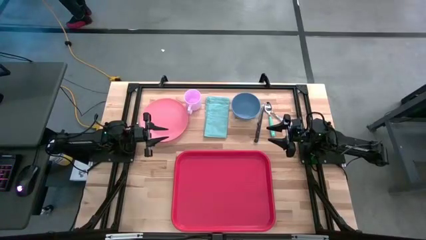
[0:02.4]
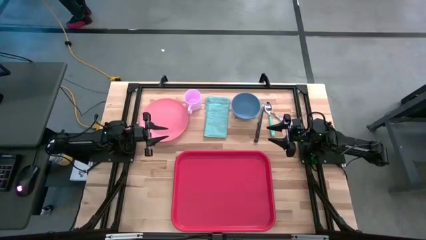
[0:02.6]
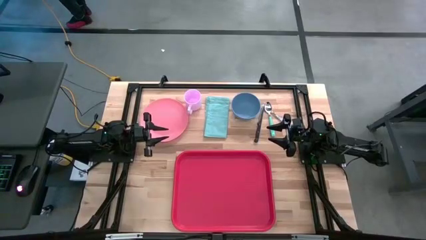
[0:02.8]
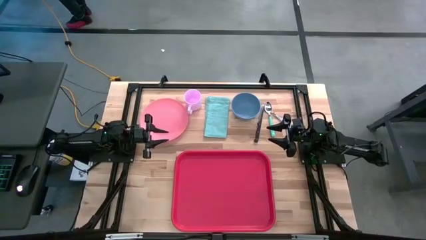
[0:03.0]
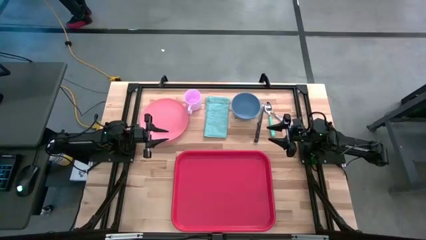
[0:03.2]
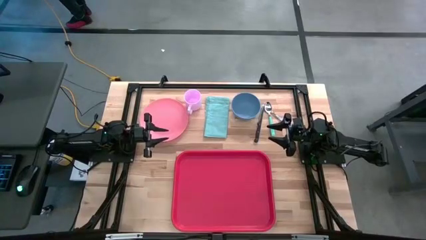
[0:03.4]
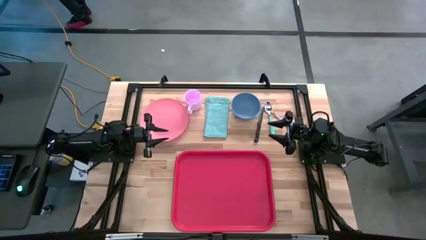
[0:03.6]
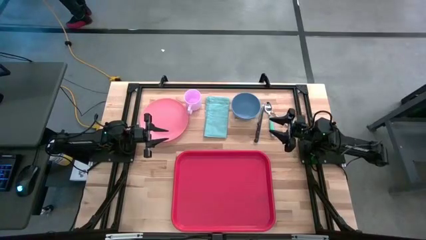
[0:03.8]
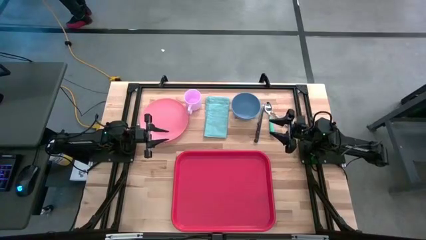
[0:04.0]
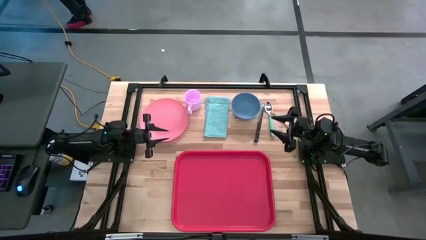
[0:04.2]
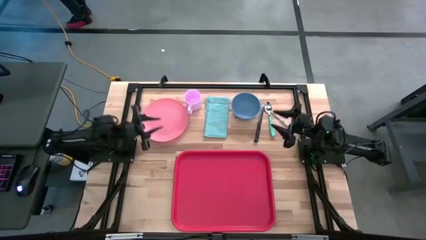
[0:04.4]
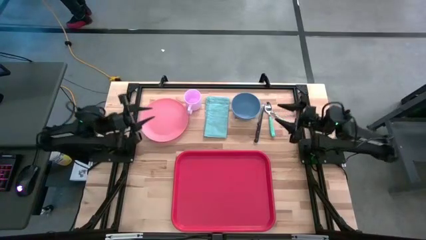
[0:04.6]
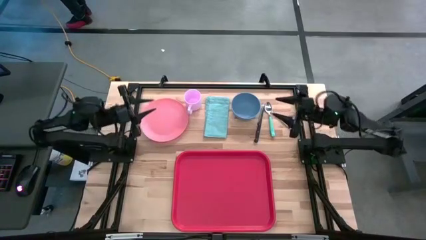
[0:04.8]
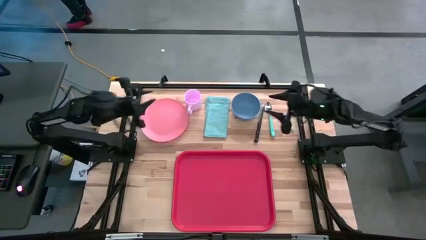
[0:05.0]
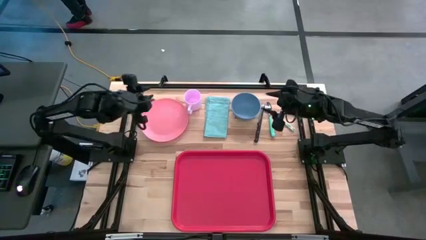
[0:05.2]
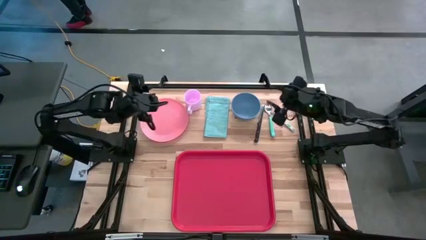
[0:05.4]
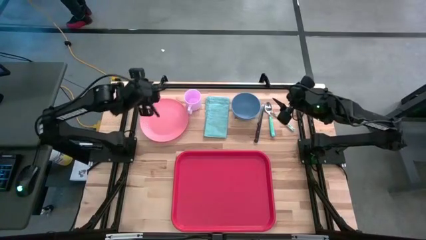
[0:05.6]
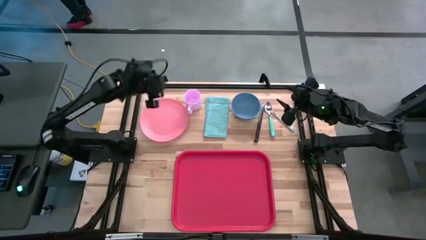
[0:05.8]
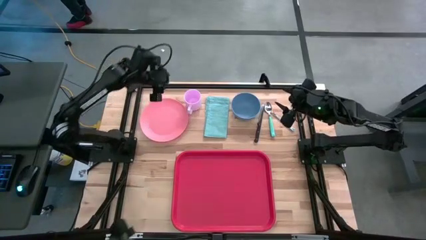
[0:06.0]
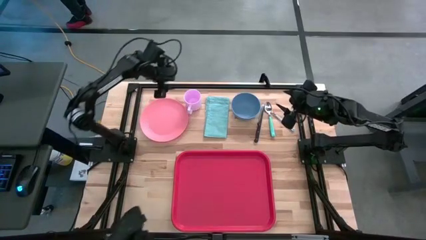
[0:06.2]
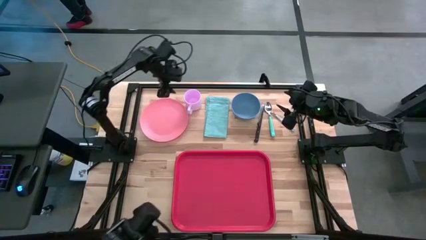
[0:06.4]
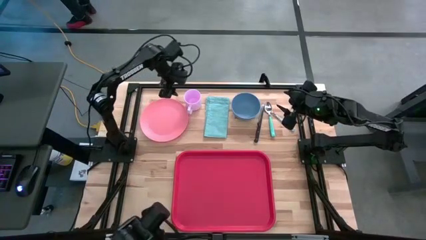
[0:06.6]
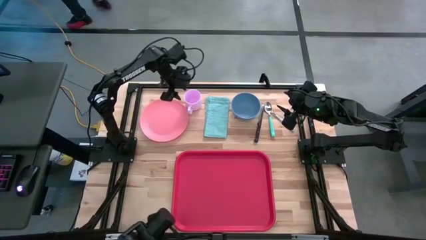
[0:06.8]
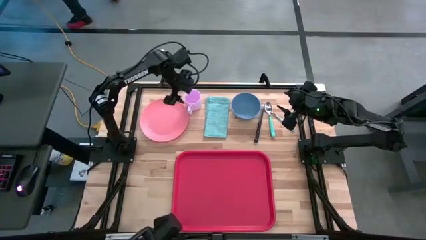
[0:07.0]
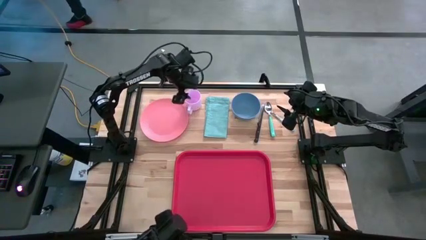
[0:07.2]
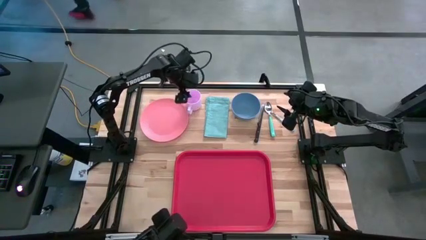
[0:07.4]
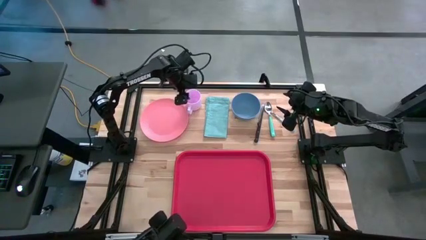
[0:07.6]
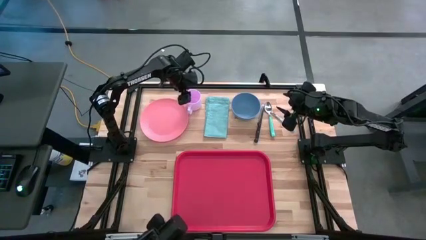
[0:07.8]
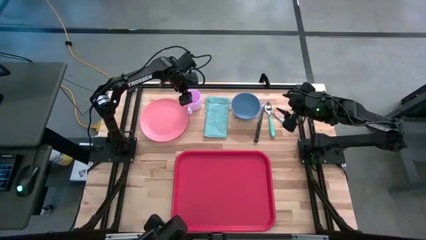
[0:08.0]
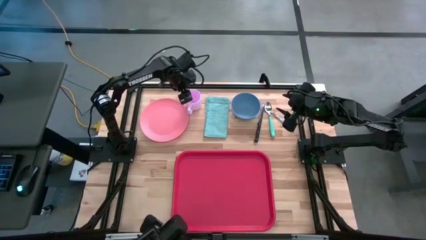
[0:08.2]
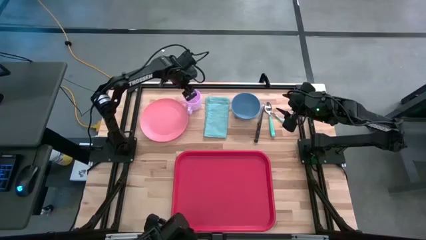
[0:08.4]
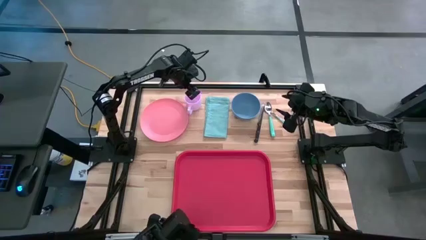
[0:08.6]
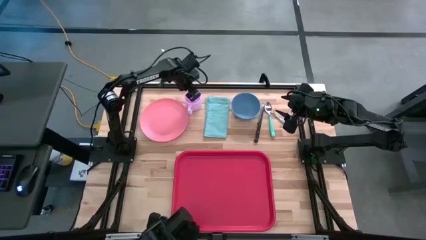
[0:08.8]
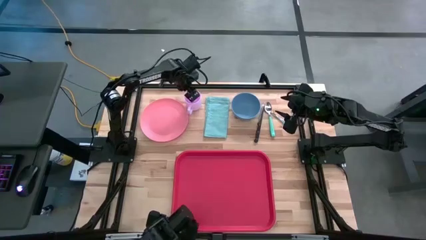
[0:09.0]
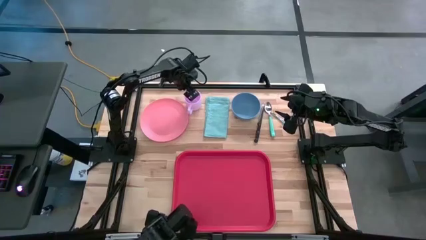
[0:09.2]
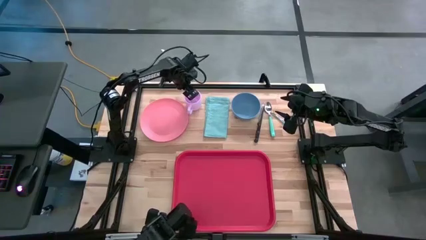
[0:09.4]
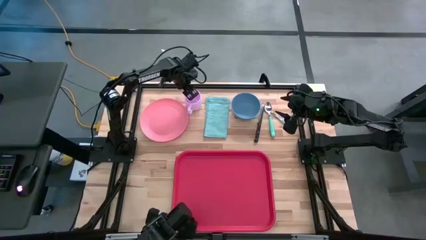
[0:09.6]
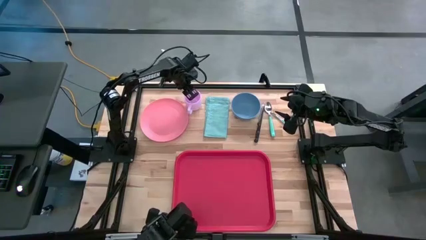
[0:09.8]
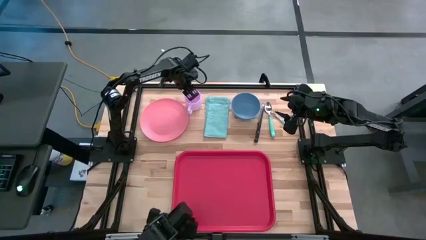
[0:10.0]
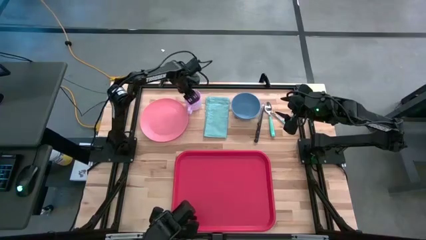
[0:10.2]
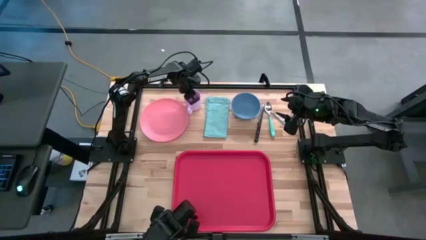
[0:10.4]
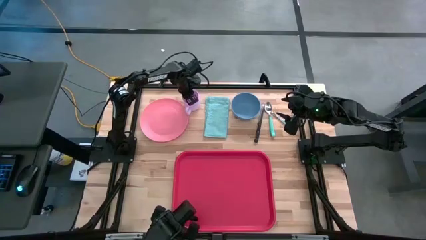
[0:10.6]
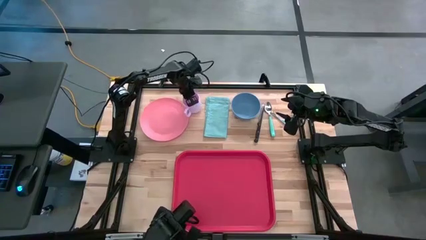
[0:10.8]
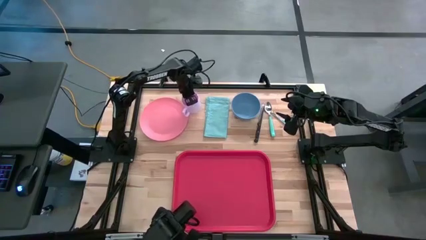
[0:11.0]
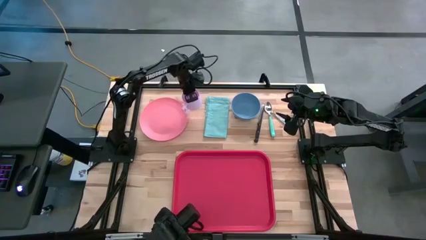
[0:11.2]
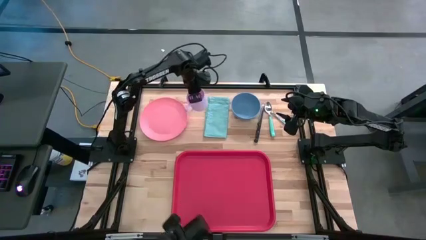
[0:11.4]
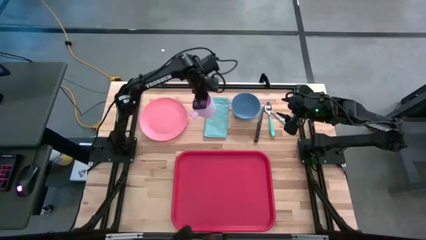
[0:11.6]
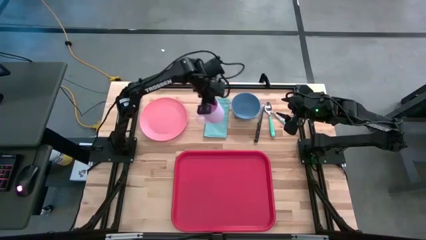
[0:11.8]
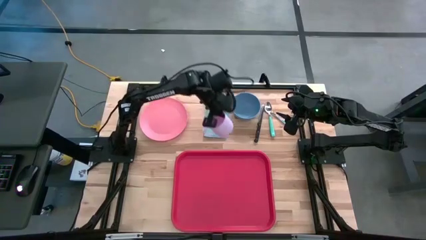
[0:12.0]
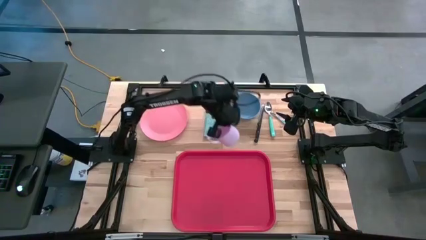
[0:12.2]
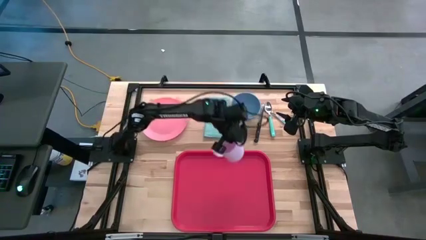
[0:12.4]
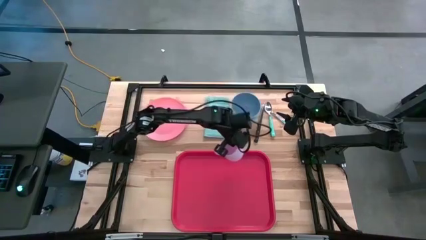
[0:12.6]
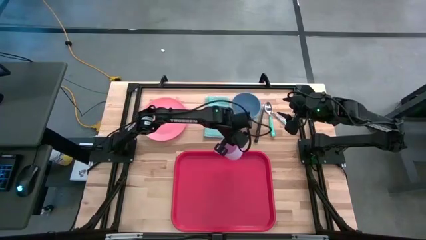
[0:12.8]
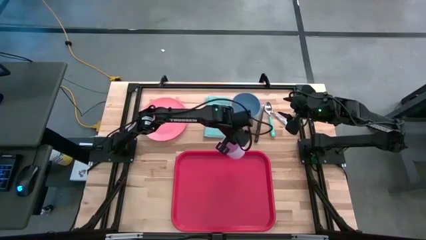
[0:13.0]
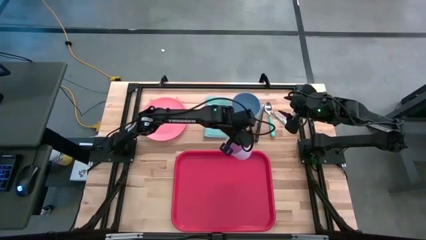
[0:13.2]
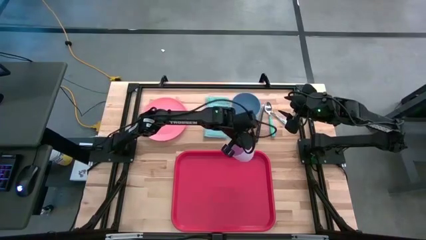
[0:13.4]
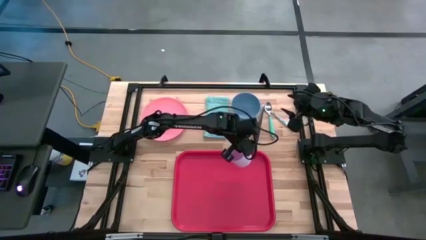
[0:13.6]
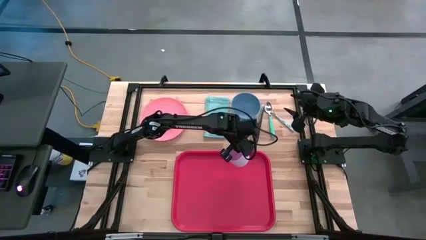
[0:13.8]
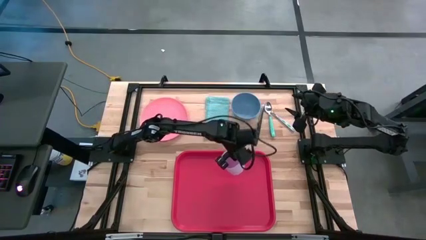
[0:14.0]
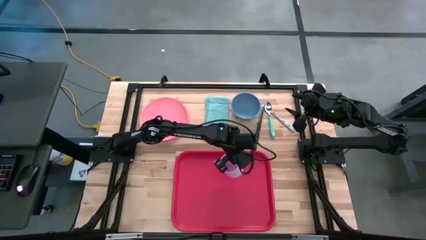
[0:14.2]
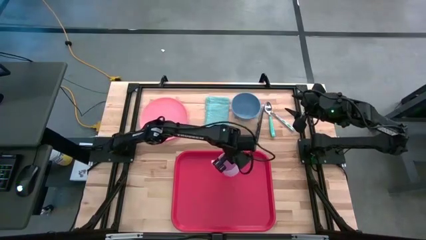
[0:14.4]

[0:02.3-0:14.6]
Task: Set up tray
Put the light pink mug on the red tray

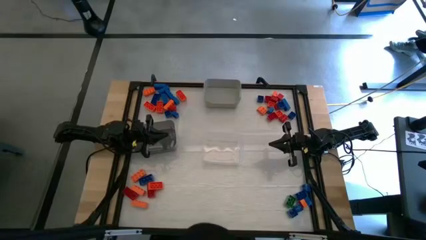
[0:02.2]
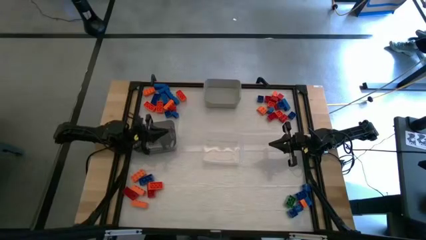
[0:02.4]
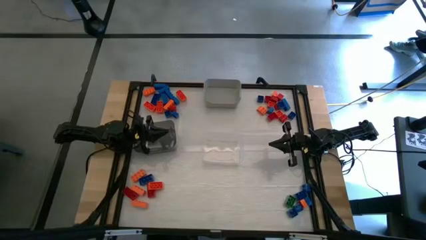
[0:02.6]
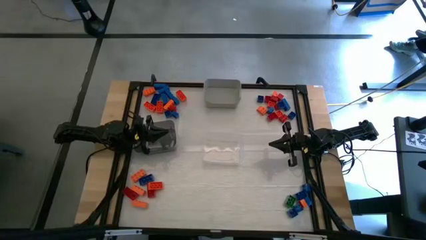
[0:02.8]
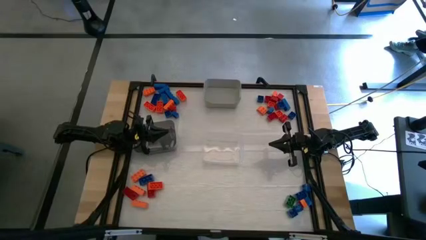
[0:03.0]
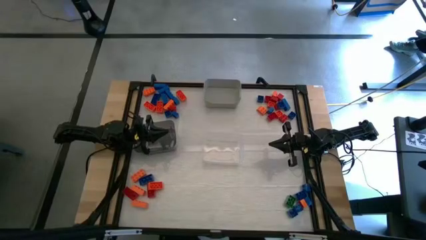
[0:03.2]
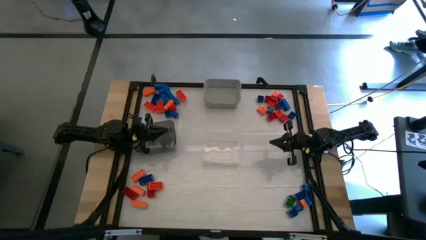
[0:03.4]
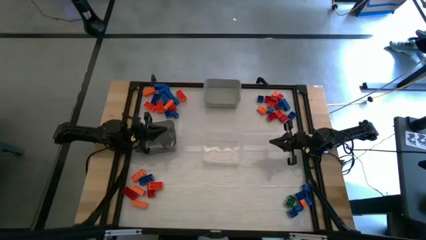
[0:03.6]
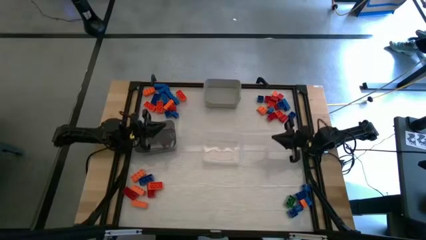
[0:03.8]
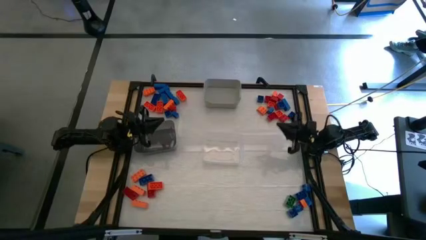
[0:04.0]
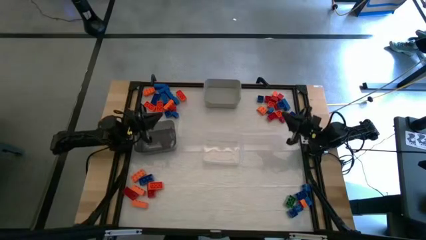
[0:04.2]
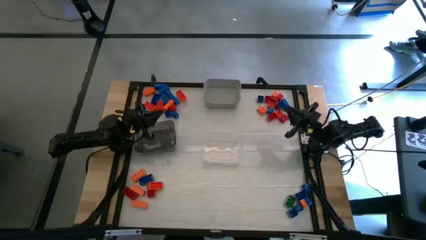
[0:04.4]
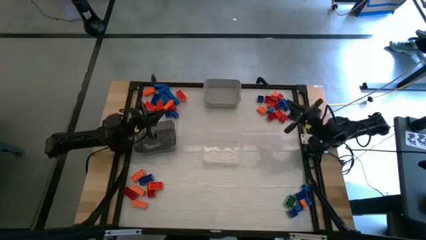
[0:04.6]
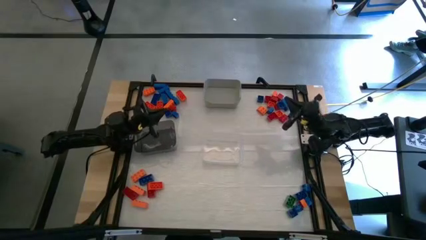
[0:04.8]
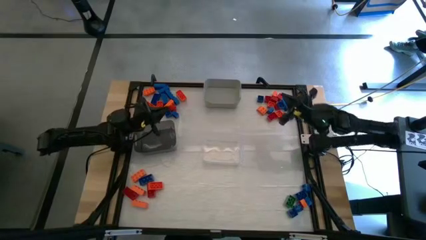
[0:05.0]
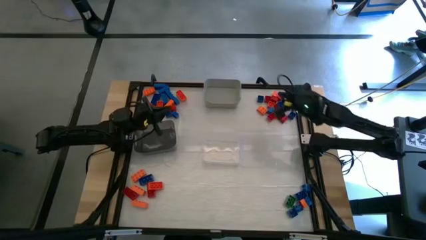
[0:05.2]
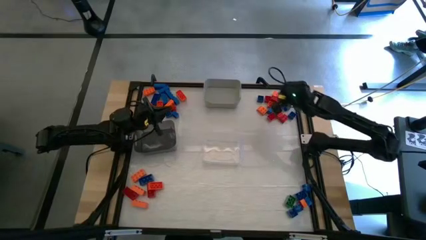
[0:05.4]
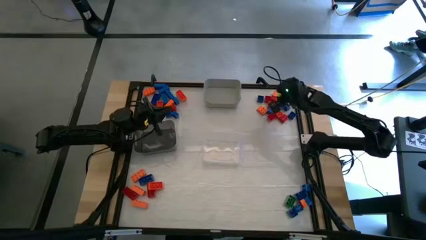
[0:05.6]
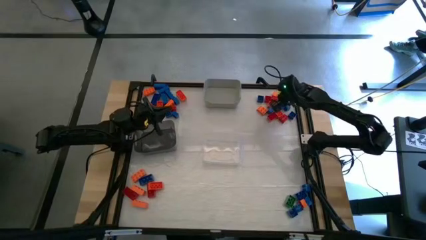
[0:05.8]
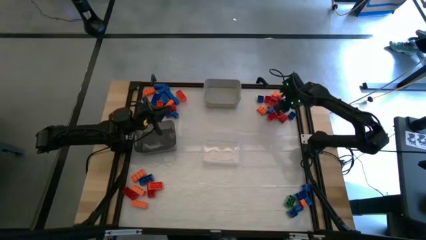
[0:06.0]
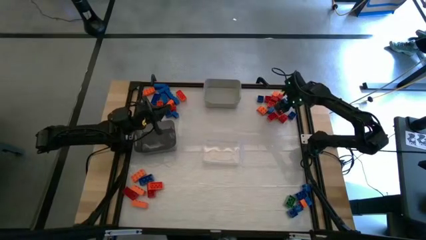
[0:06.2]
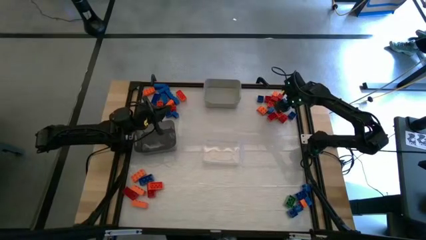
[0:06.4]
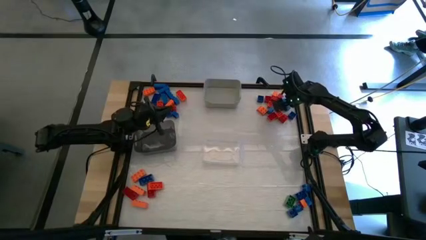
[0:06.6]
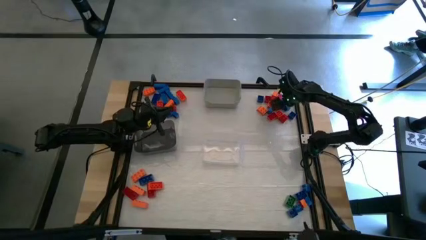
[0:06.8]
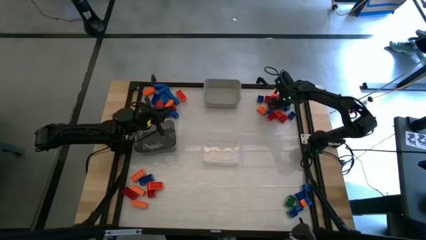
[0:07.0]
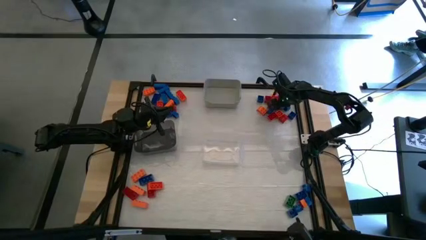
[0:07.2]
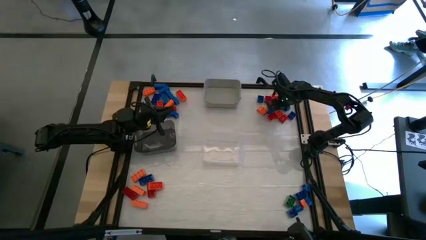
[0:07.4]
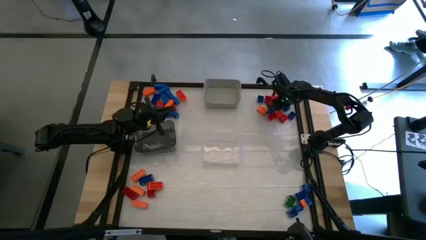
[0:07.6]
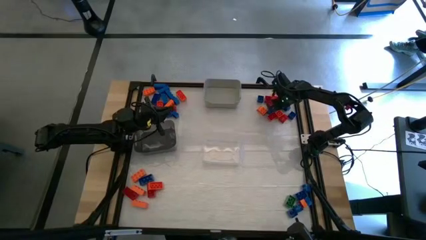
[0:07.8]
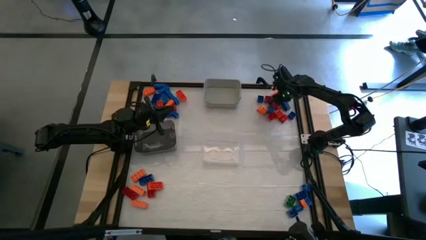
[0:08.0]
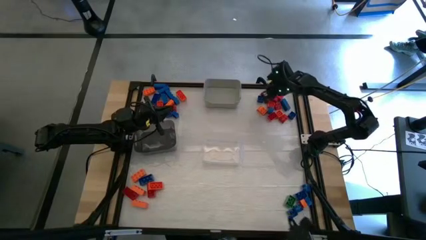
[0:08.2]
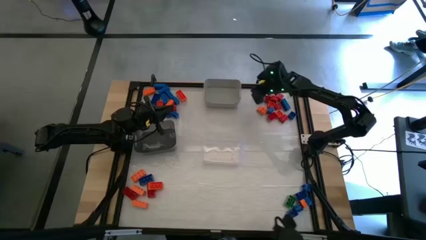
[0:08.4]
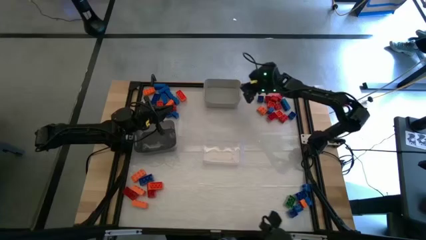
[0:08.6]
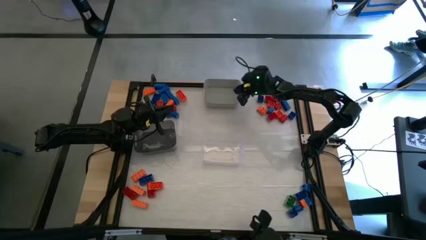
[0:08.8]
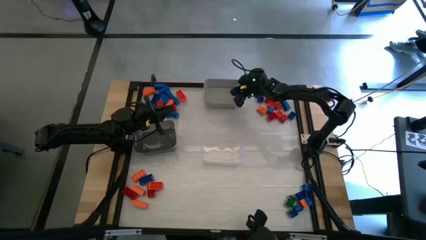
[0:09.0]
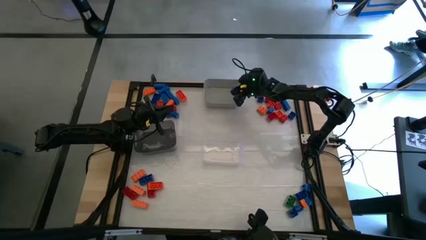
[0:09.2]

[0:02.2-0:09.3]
Task: Sort blocks by size
Put the small blue game piece into the gray bin
